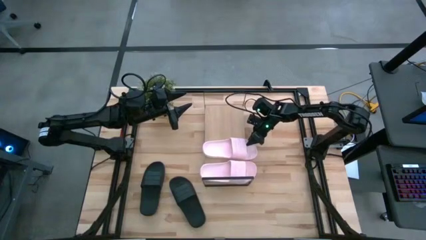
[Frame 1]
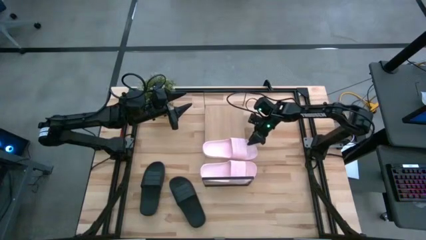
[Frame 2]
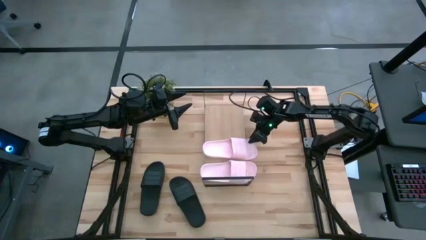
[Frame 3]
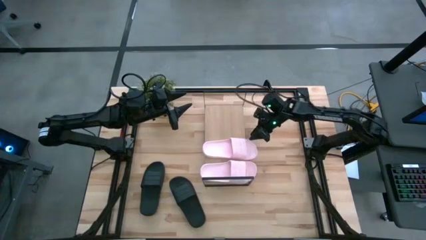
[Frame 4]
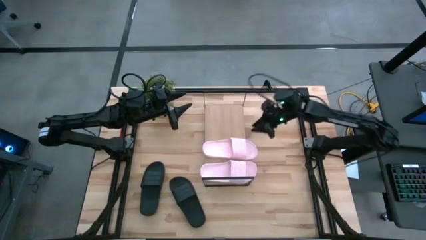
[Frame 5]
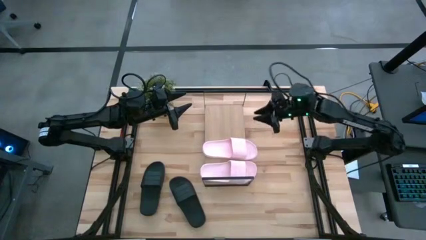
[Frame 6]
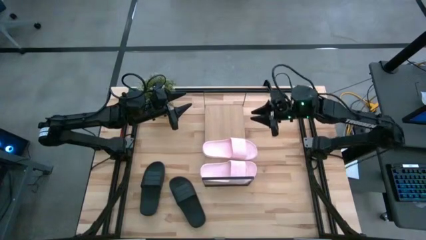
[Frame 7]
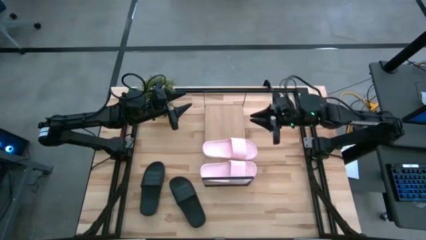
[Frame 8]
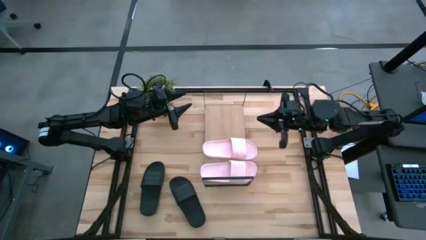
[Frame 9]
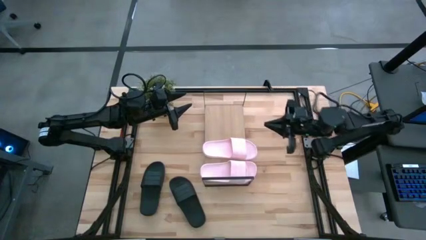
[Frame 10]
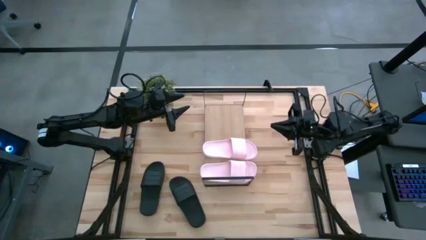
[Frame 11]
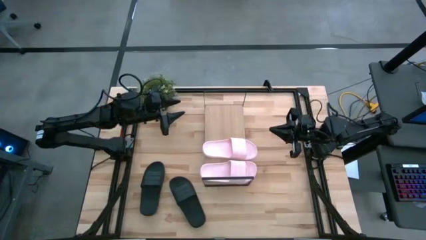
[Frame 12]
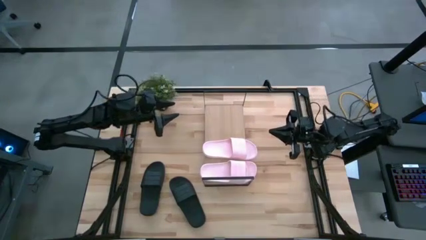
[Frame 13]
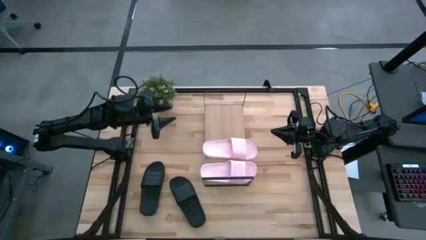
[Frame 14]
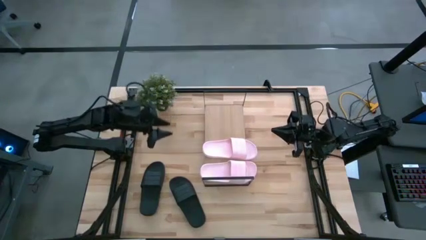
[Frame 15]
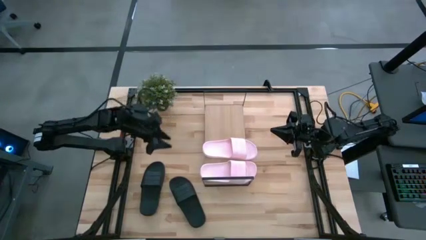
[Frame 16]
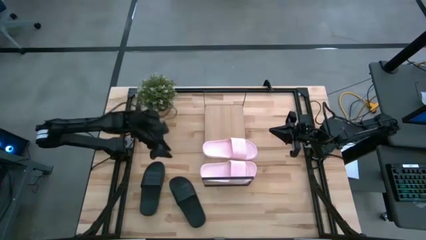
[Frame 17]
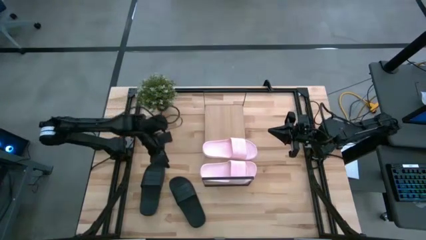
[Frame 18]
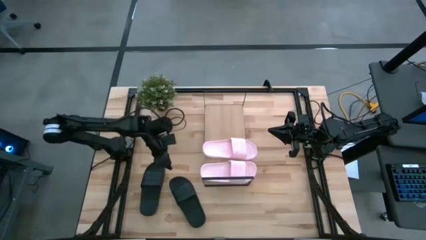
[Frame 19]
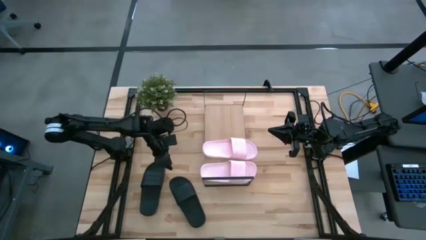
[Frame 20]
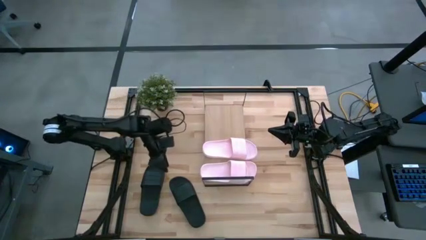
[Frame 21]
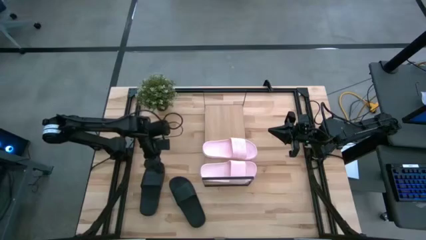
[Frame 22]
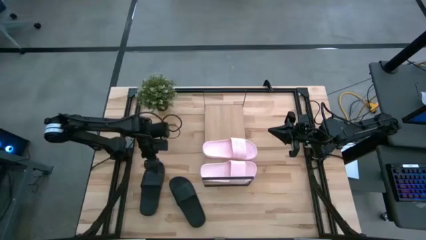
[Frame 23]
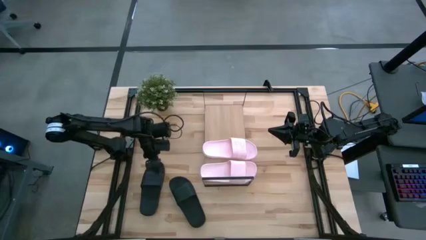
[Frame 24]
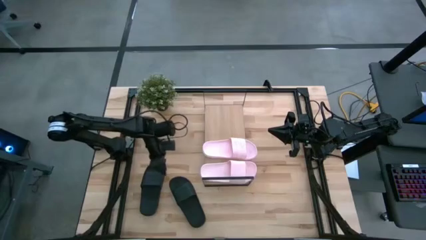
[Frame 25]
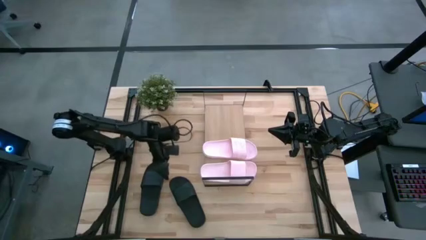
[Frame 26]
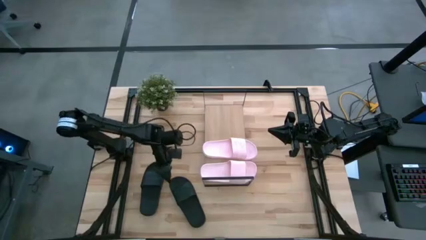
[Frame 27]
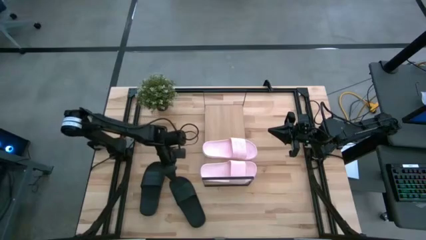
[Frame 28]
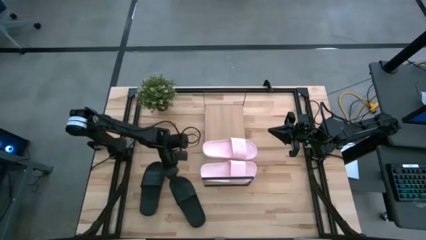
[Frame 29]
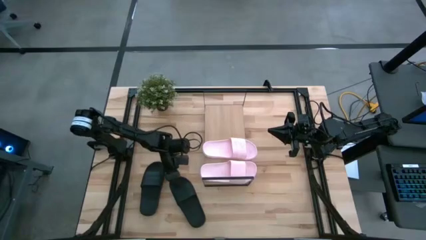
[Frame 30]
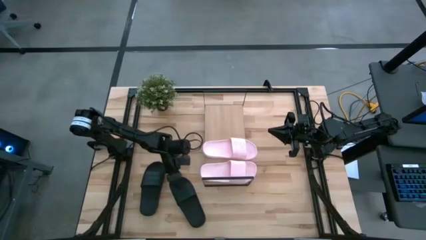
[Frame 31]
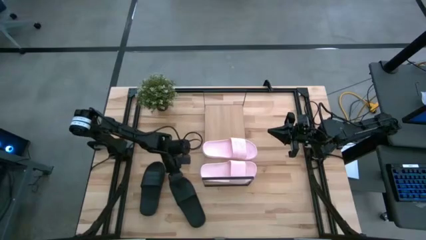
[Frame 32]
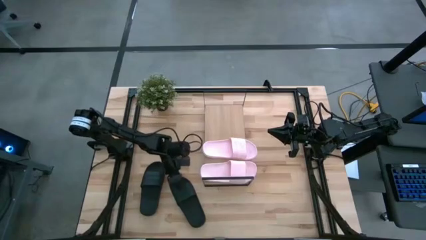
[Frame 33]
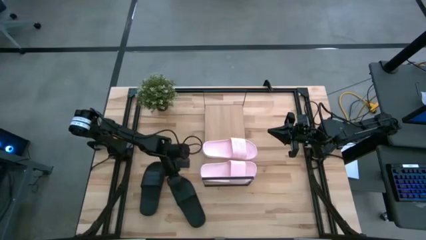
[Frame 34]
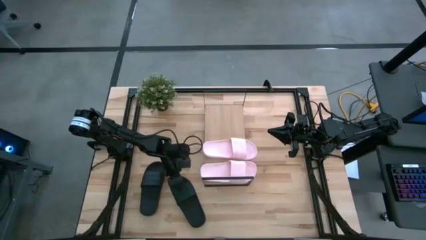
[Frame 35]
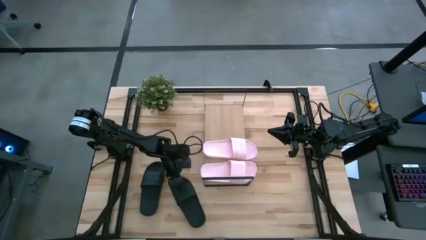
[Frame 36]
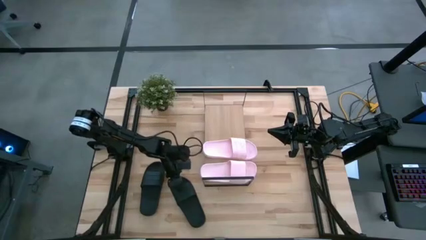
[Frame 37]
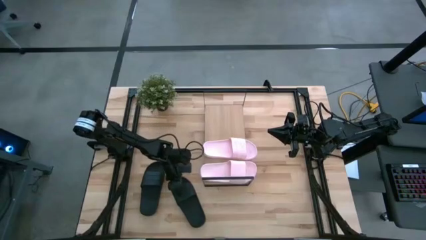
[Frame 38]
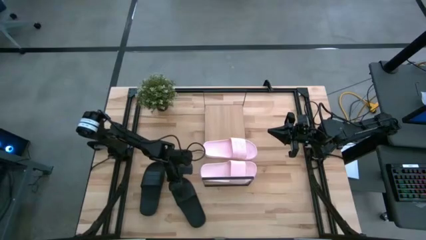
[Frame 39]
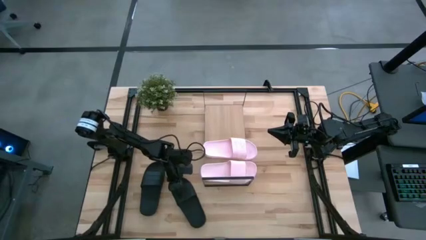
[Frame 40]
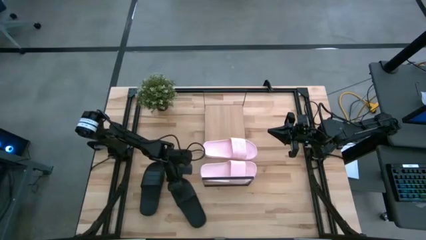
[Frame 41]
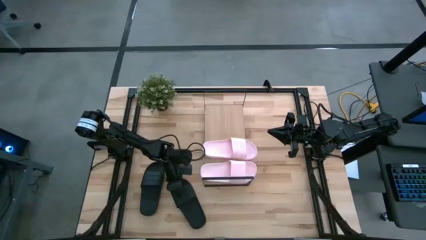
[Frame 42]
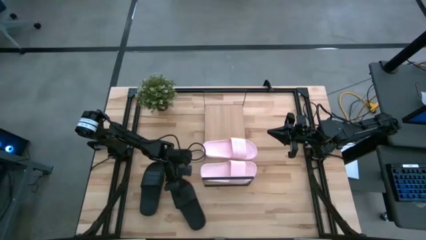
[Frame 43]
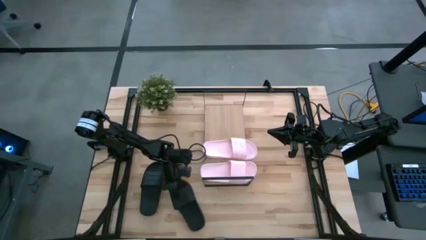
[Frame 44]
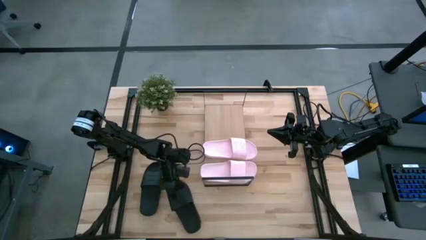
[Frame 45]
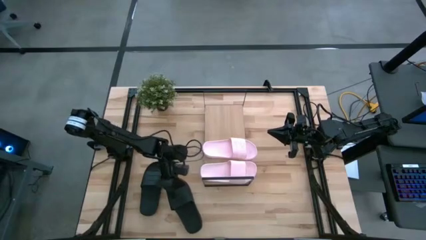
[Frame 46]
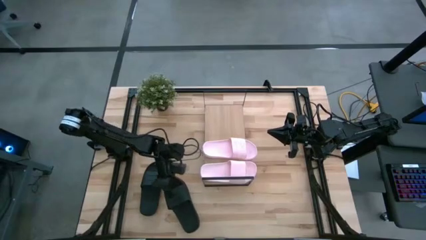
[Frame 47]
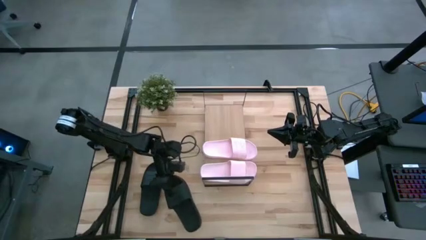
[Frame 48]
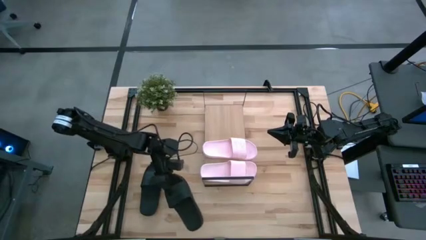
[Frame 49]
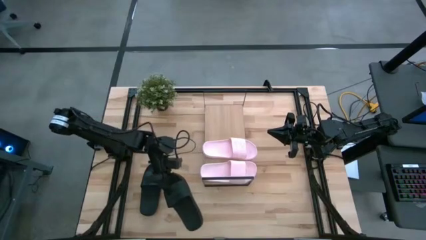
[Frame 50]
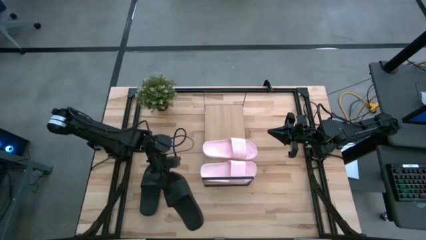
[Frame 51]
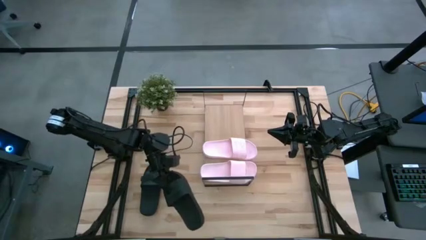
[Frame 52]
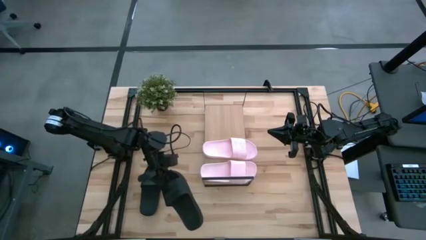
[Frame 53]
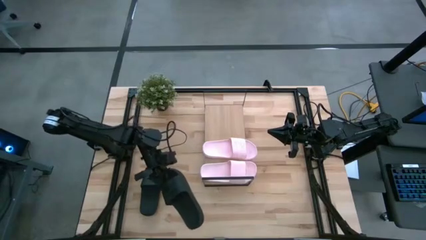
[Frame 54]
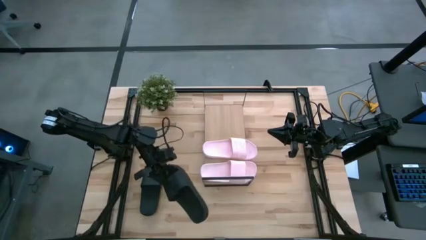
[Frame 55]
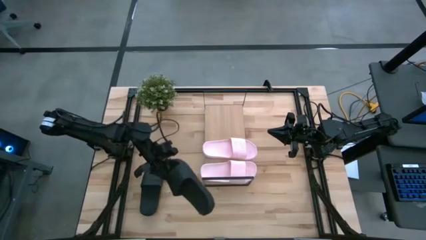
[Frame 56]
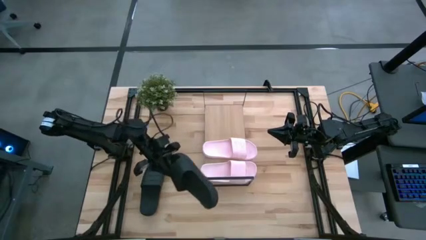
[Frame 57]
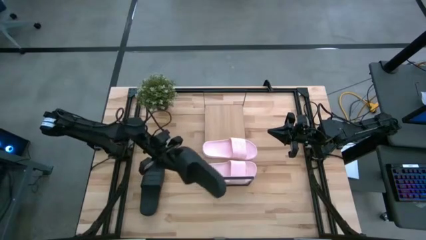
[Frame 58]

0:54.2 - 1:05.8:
Task: Pick and place slides into the shelf
Put the right black slide on the shelf

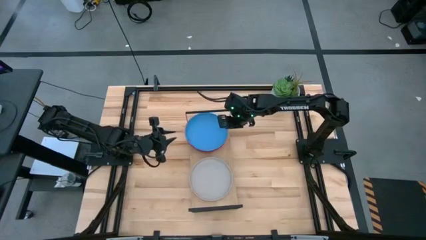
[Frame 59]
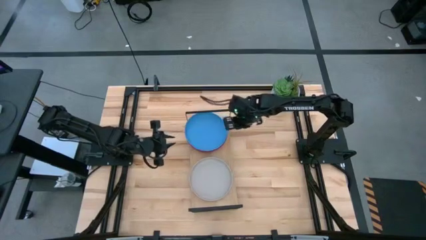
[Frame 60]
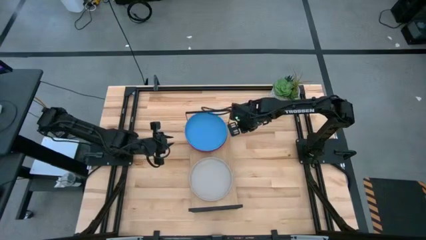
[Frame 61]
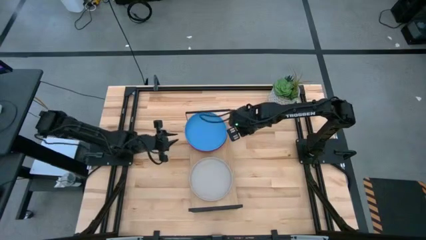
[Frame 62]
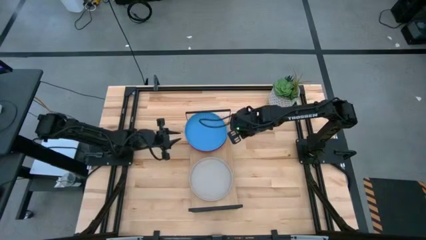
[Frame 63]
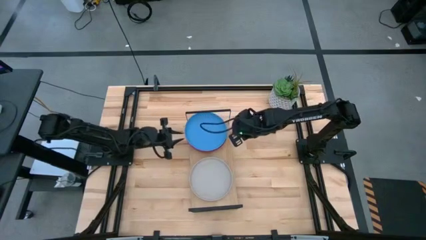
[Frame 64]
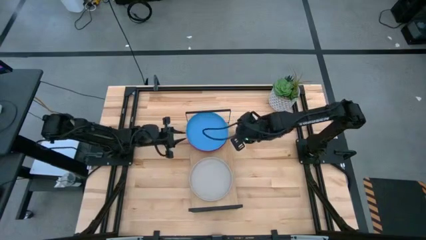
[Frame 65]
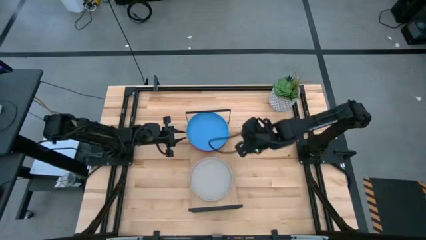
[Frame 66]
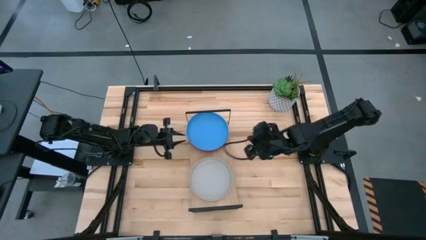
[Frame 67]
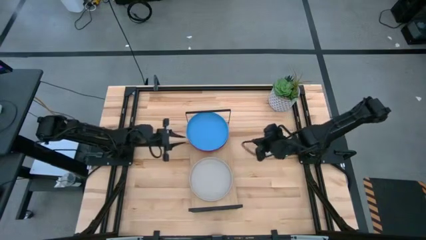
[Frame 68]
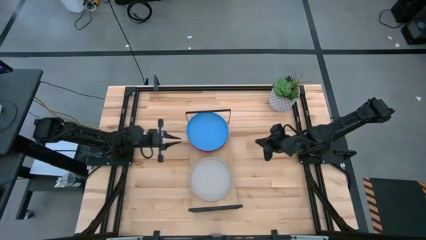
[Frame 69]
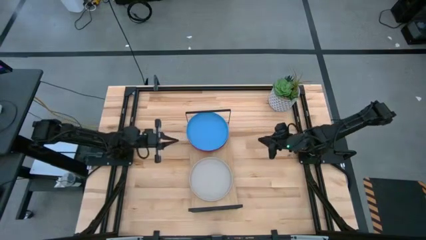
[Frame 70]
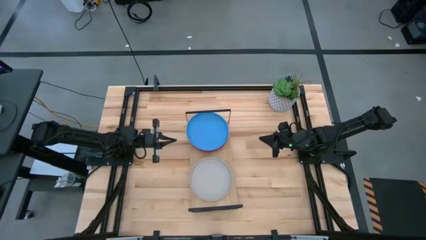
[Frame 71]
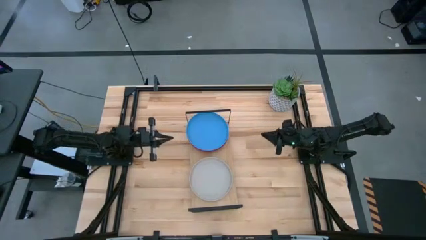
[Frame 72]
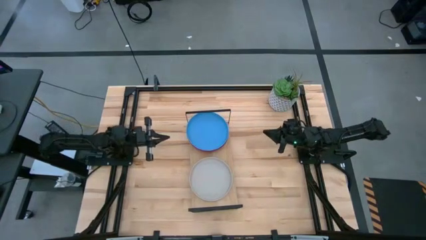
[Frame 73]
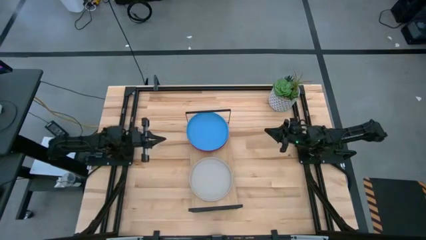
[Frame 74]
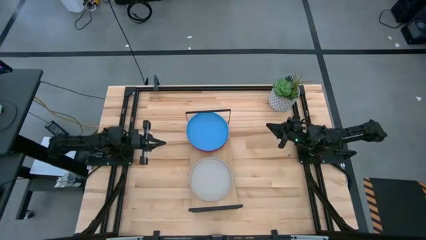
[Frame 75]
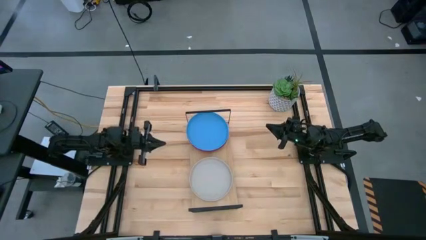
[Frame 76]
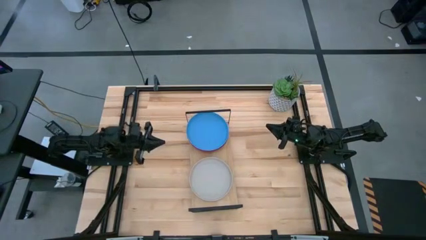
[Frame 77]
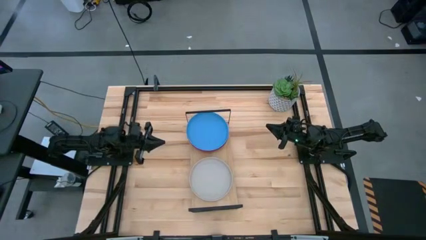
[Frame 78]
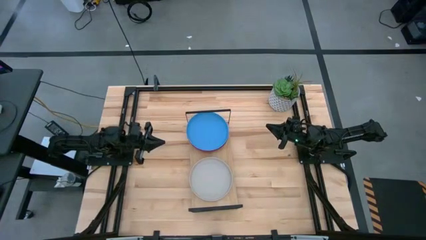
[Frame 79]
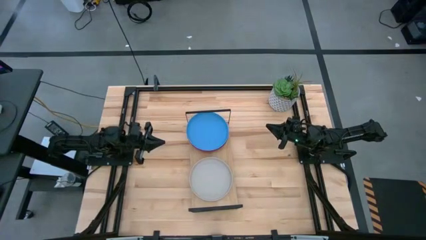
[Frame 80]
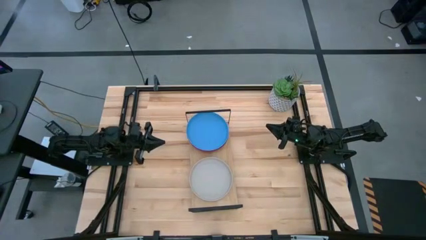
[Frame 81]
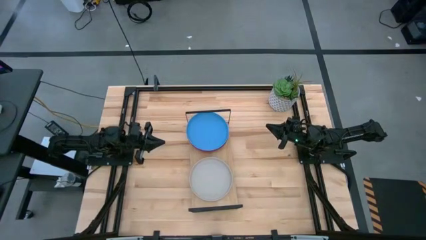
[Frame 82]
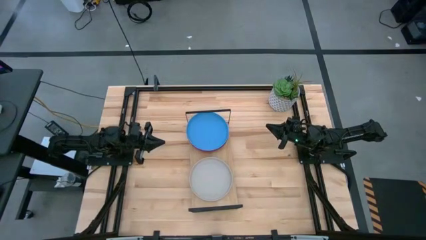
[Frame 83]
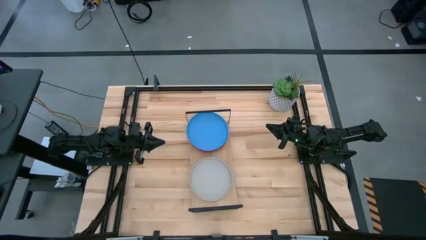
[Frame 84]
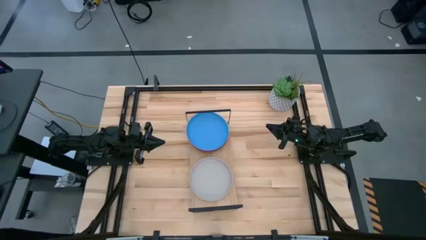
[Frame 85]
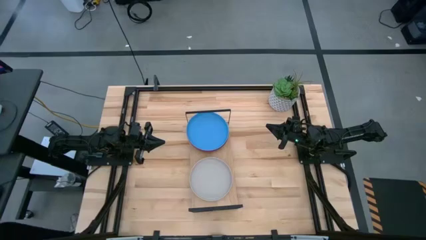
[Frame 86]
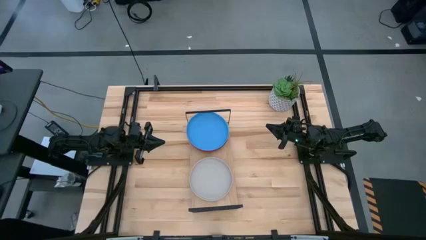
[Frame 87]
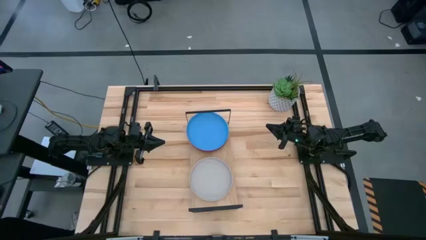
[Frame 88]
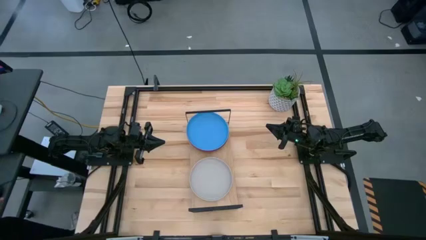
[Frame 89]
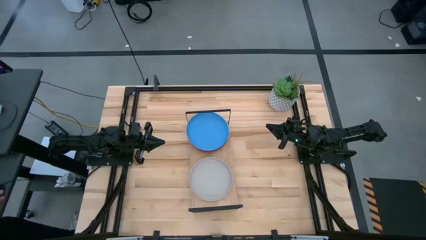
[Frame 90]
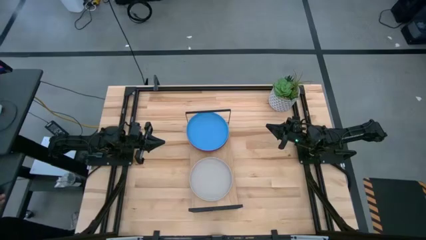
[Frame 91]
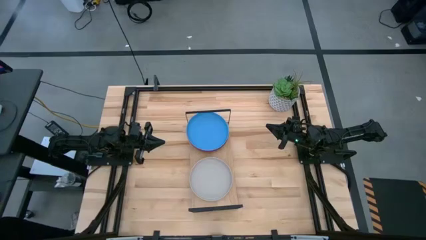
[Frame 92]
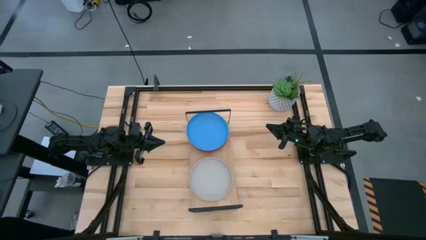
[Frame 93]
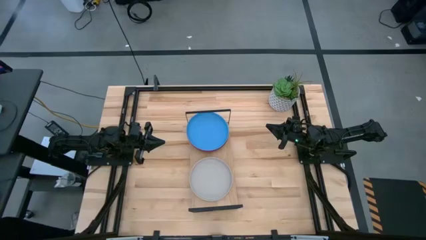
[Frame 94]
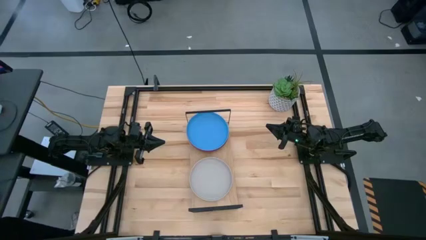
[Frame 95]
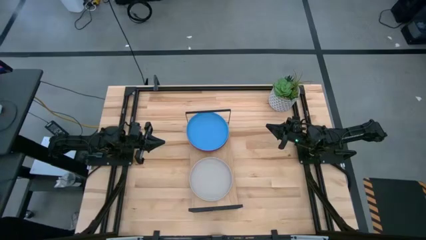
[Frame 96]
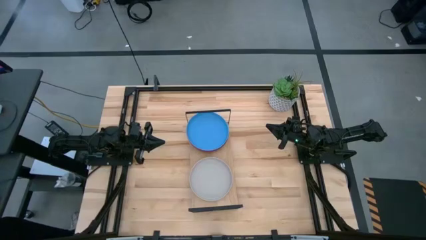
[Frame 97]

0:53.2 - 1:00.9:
Task: Place and stack plates onto a shelf
Return to Home Position
